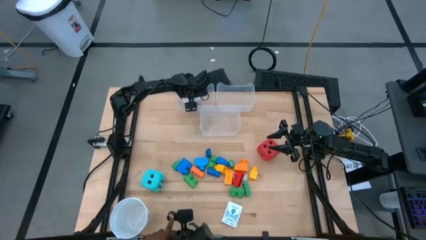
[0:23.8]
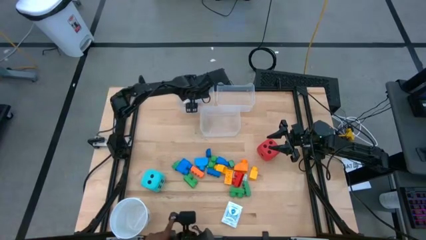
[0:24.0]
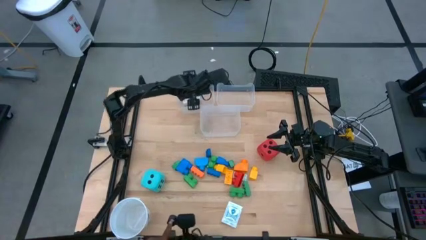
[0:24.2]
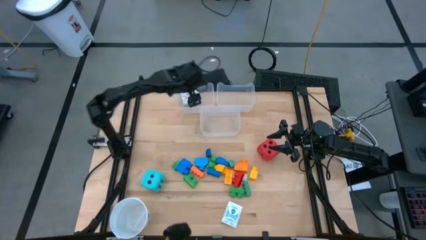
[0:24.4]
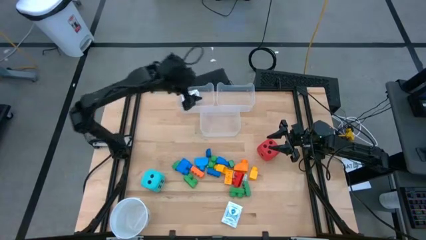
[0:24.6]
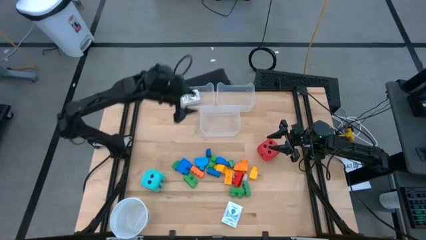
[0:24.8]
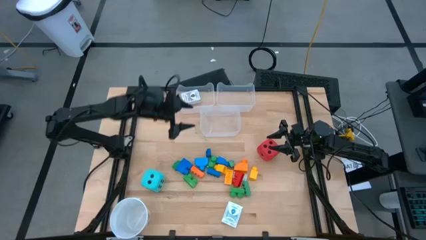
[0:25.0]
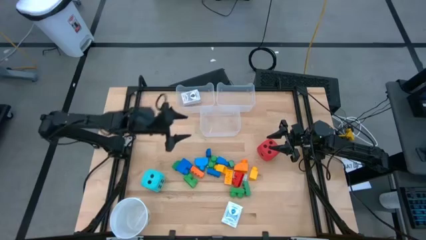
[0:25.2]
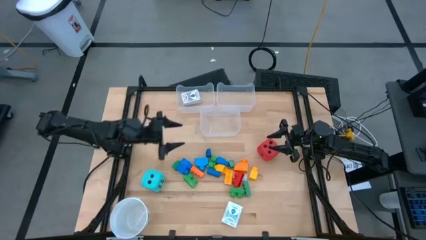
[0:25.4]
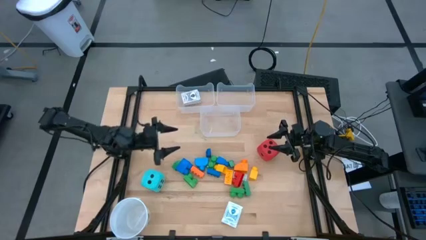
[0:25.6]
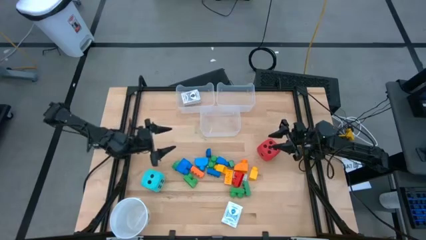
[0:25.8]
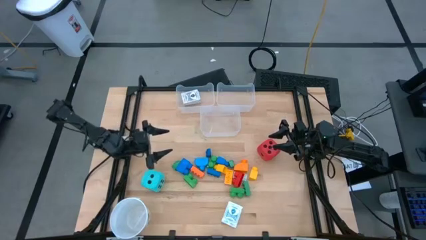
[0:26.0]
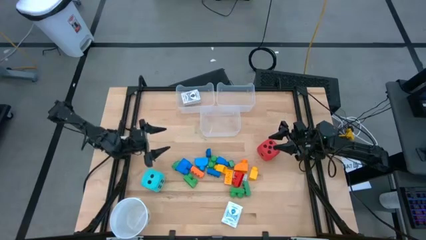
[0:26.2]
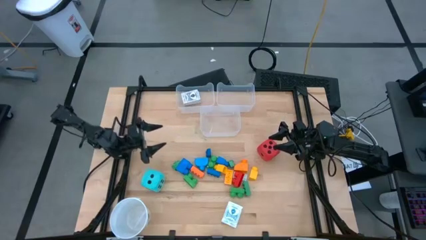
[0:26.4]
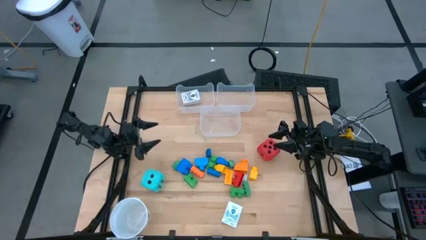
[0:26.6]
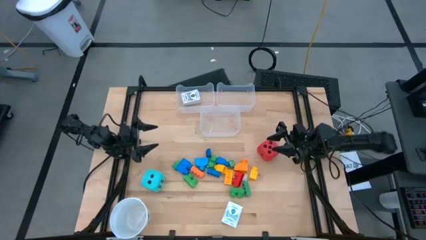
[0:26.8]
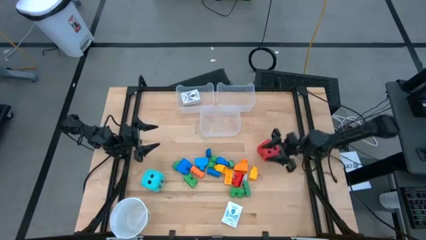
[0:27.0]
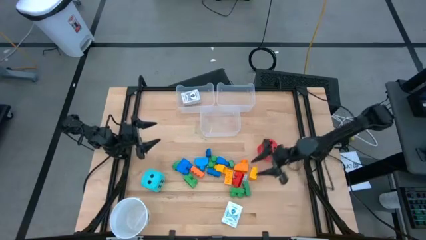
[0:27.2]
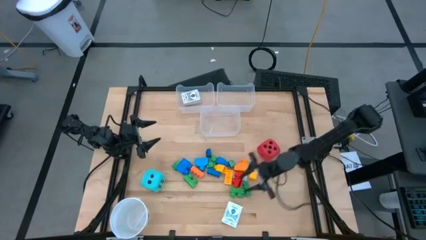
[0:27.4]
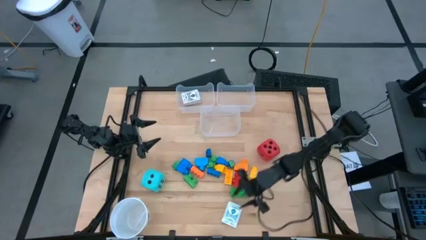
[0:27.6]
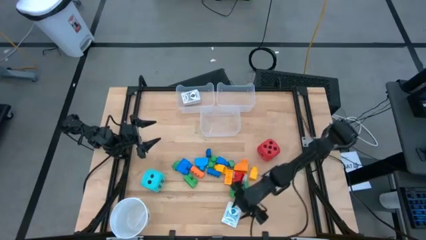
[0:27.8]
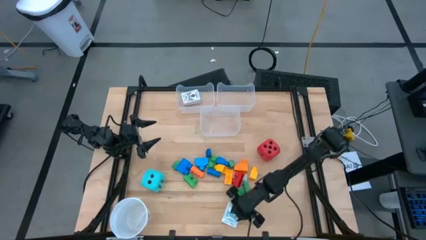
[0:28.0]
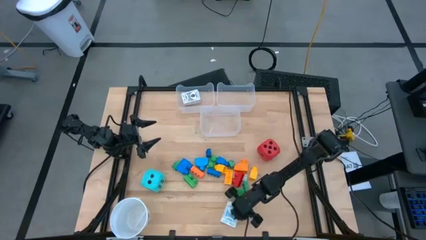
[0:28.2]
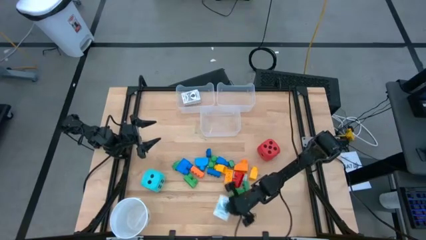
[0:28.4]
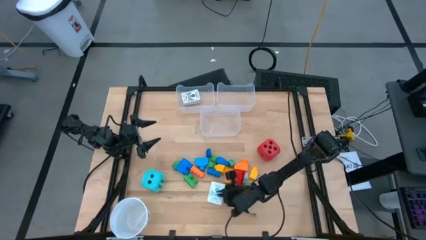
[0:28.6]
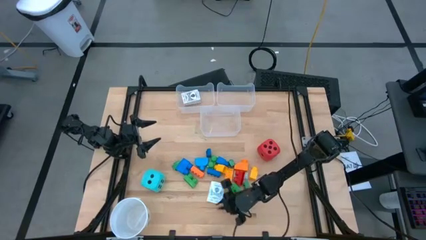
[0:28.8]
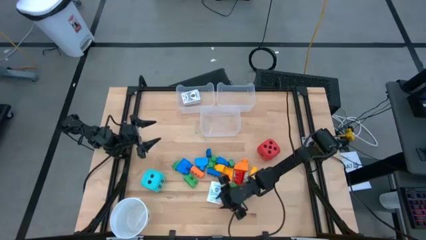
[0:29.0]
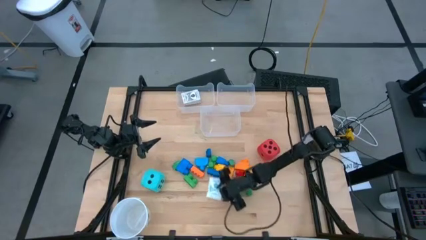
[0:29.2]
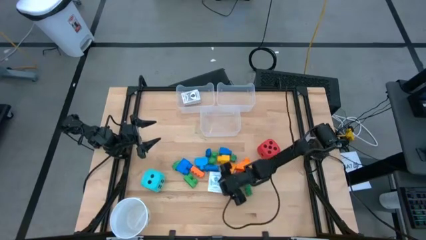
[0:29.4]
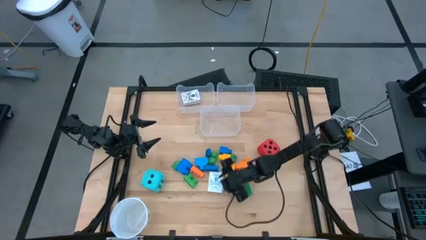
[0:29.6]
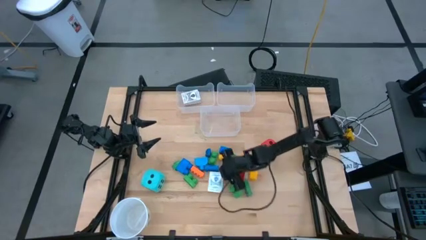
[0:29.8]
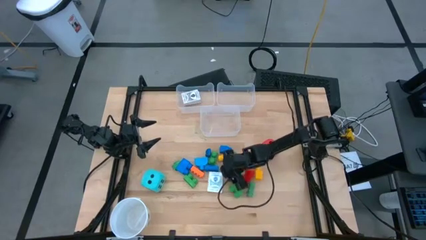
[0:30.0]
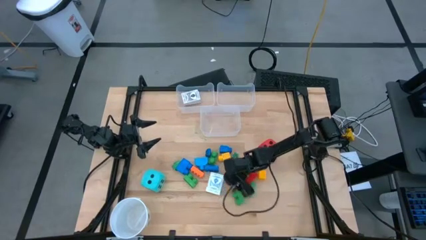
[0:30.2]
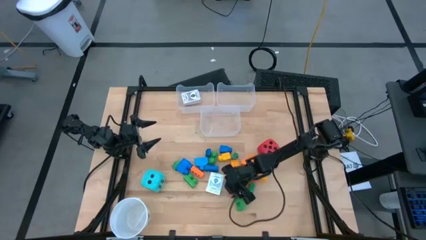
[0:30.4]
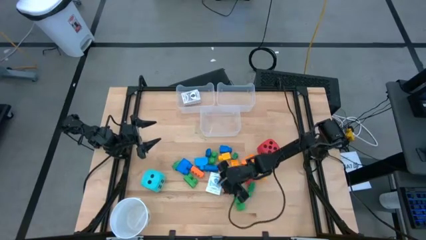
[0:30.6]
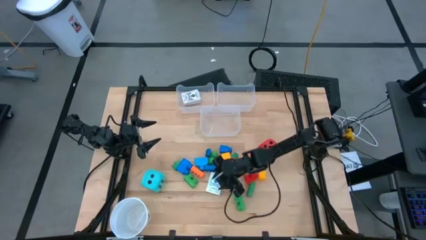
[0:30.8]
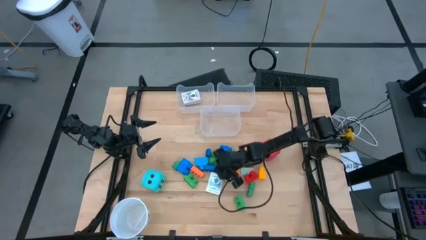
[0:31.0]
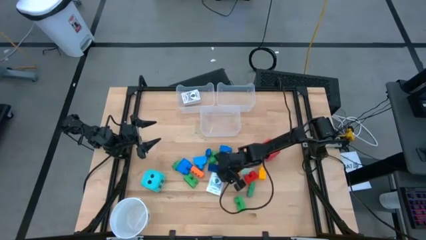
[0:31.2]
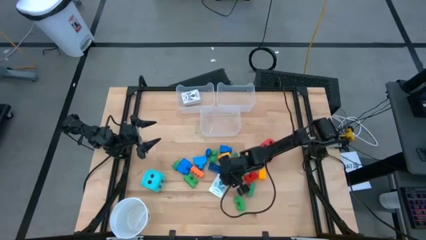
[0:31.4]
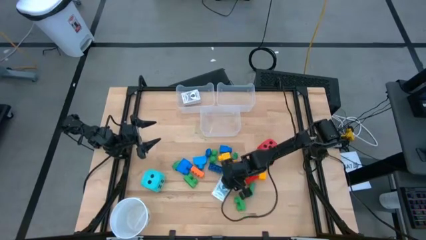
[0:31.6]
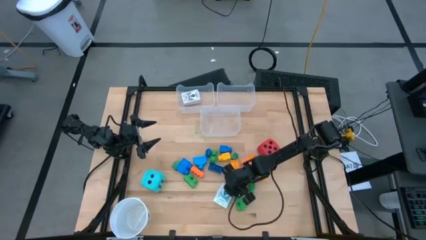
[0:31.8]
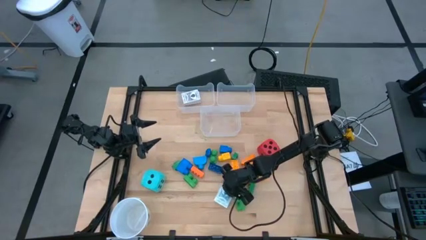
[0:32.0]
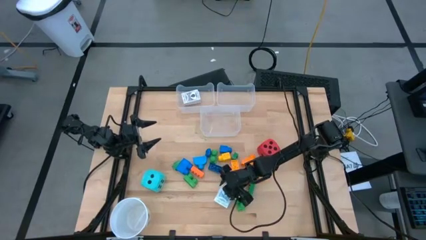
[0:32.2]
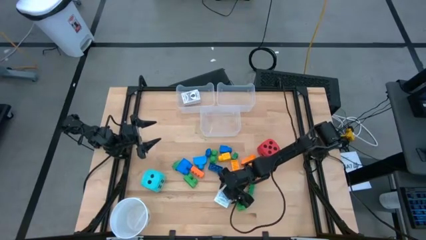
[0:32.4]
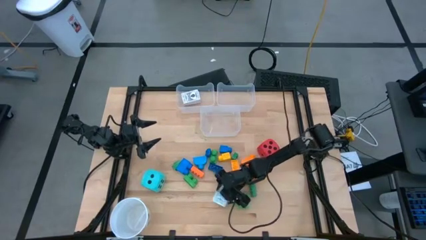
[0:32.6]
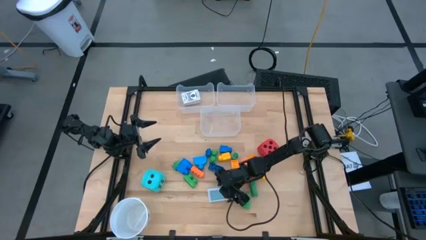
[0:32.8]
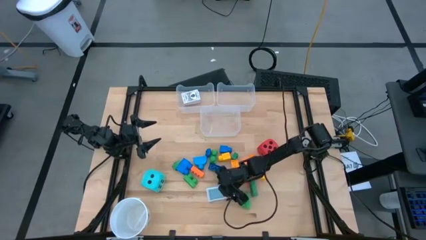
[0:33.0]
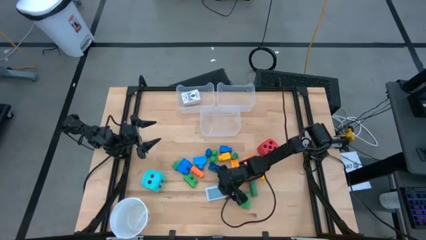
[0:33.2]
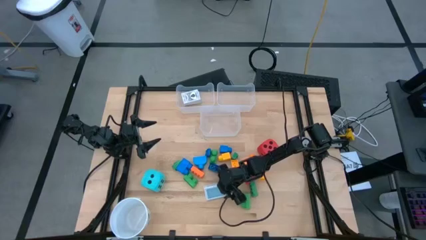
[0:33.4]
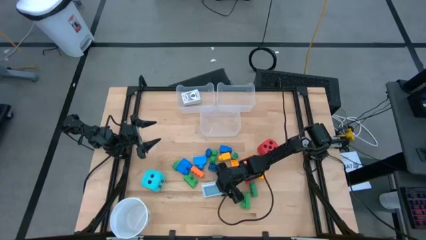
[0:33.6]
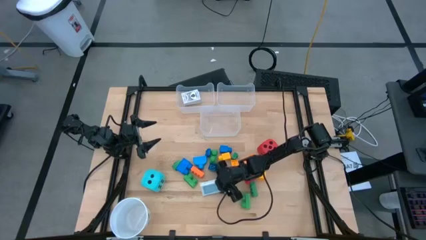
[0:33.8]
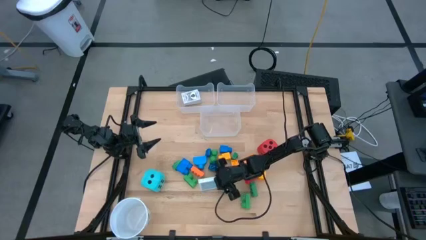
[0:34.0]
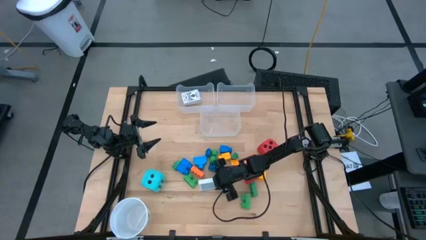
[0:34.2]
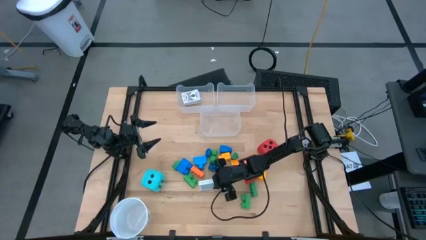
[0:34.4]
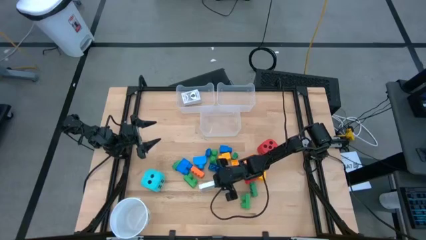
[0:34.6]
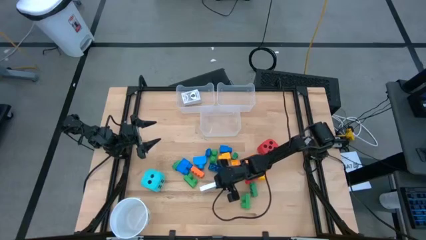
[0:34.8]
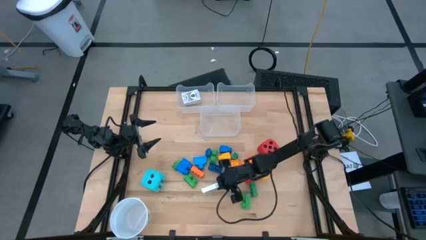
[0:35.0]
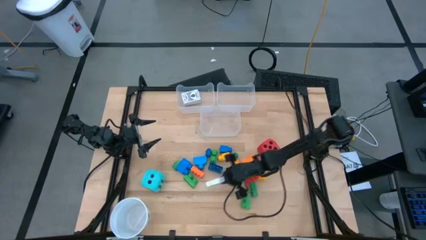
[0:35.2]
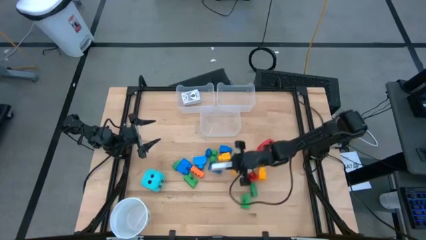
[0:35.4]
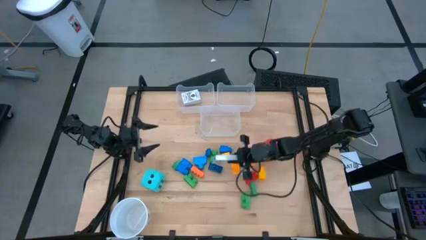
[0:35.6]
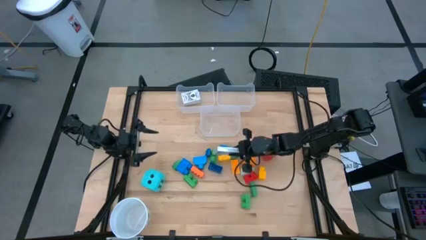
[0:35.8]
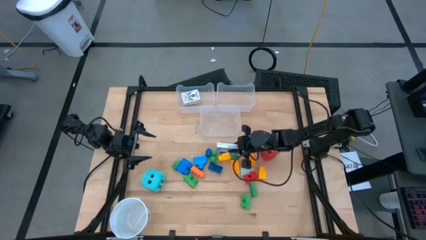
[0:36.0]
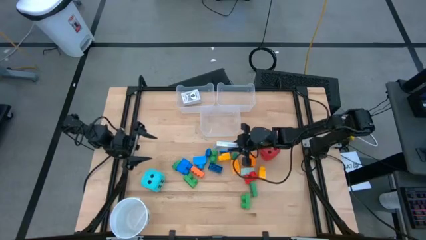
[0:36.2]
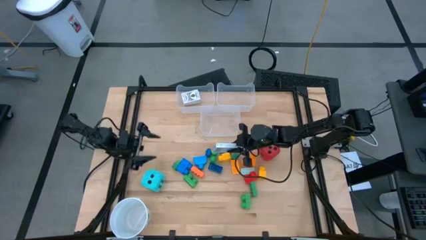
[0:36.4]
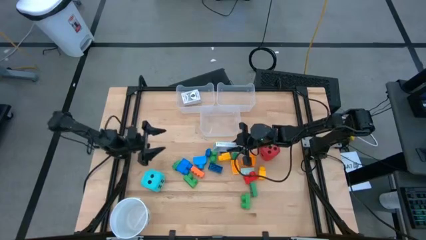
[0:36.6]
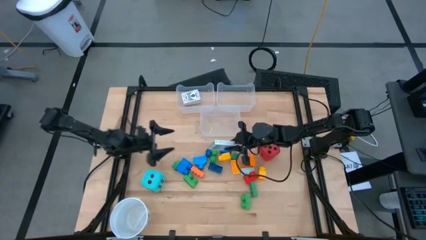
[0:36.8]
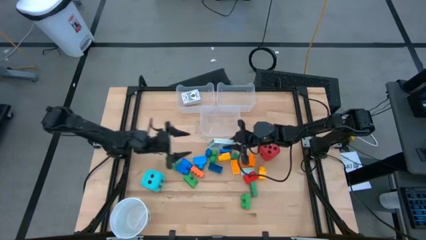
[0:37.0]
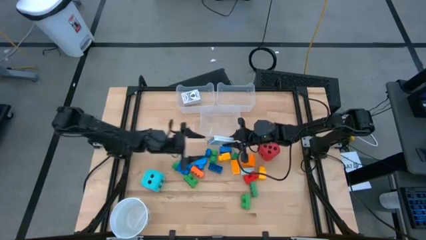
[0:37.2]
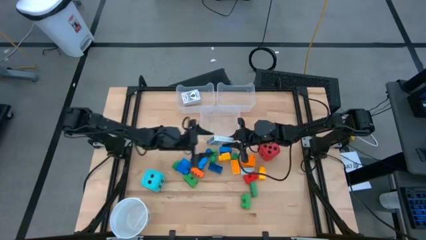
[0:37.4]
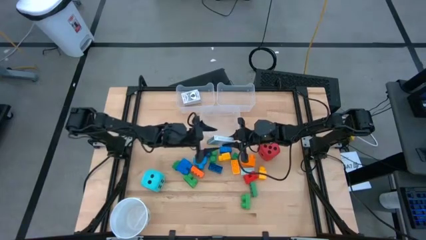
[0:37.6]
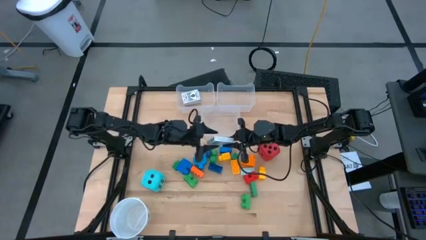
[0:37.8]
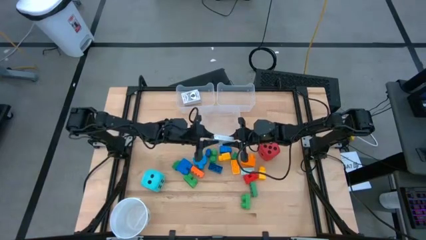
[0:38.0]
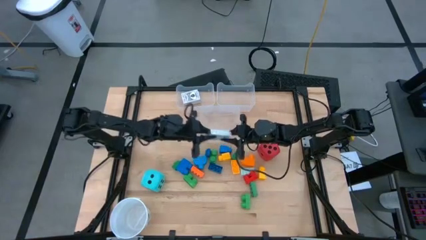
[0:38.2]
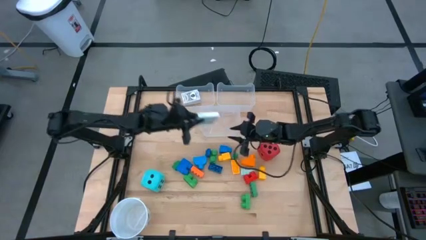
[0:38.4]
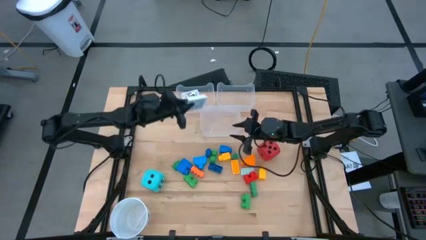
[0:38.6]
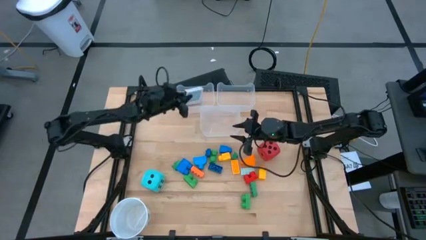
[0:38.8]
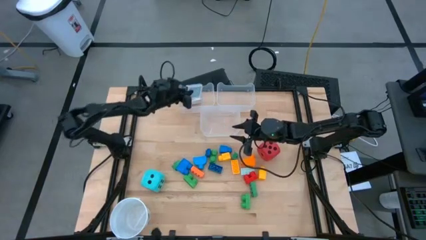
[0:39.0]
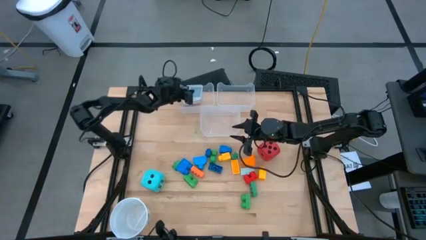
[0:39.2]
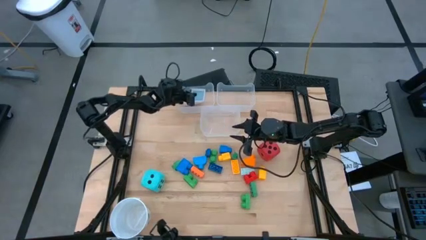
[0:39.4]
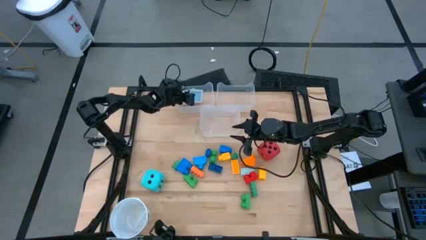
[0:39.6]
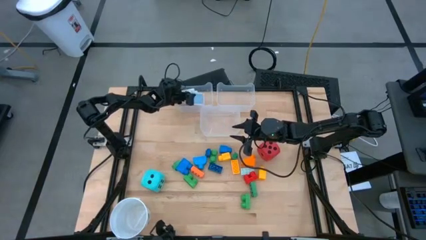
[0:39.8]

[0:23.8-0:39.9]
Task: Pick & Place Toys
Put the green deck of cards into the top left transparent bin
